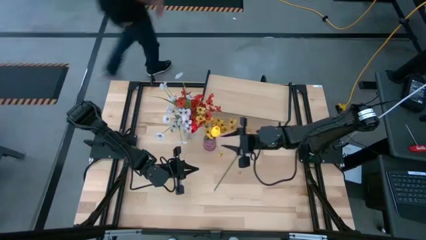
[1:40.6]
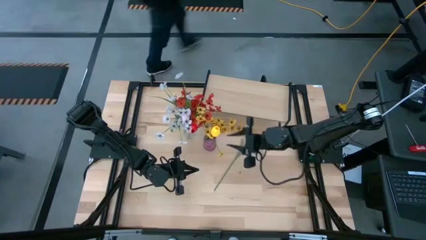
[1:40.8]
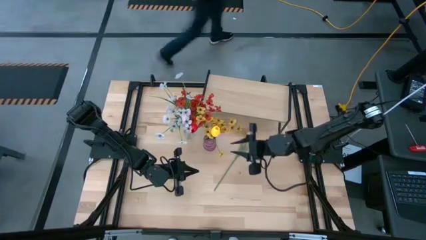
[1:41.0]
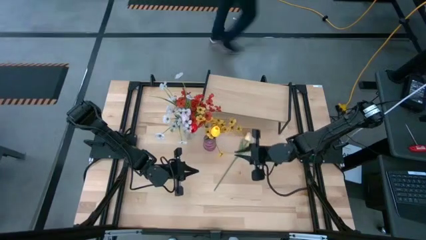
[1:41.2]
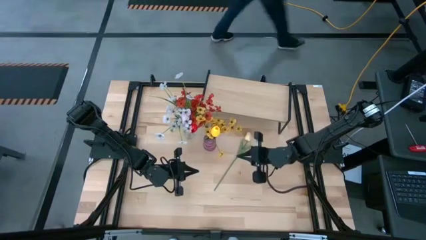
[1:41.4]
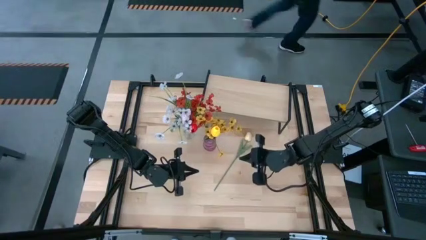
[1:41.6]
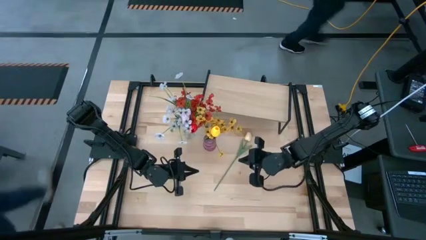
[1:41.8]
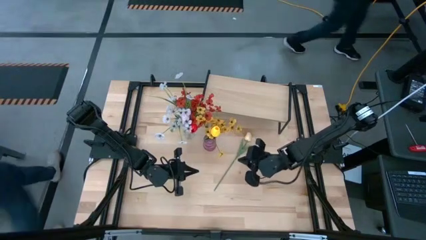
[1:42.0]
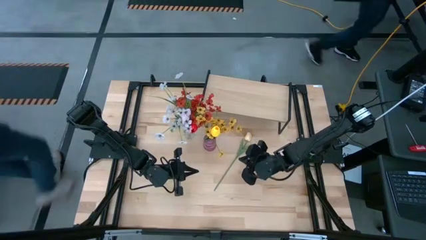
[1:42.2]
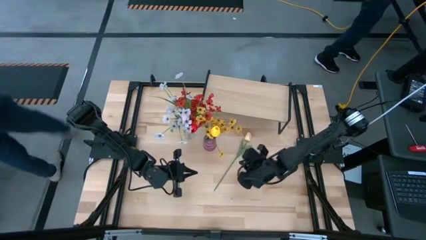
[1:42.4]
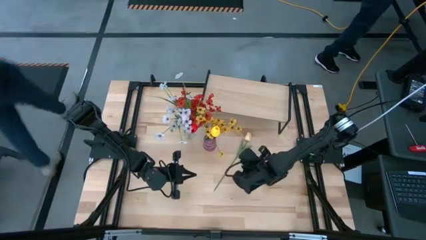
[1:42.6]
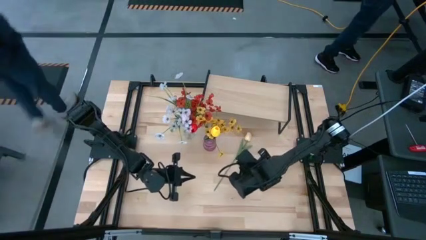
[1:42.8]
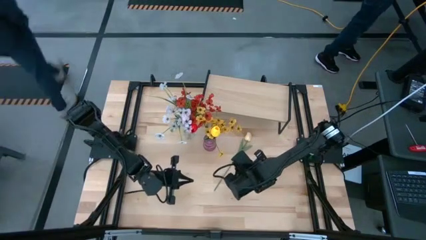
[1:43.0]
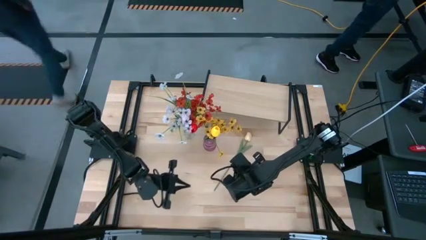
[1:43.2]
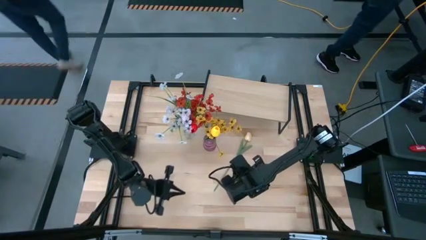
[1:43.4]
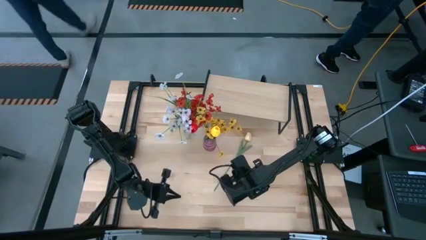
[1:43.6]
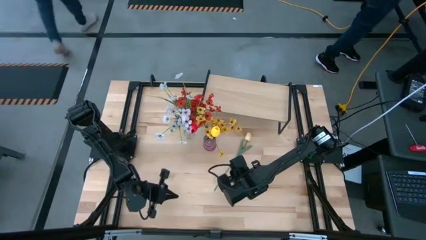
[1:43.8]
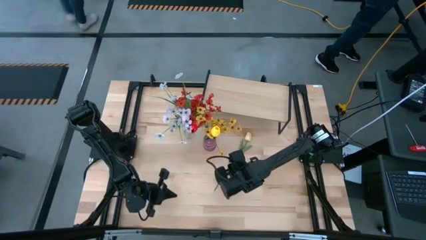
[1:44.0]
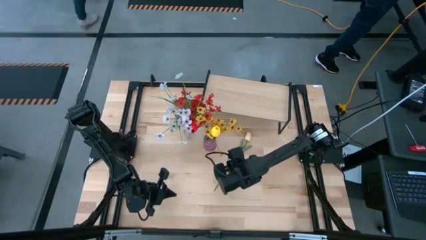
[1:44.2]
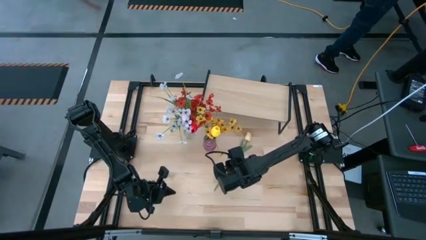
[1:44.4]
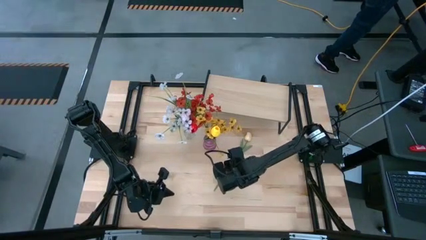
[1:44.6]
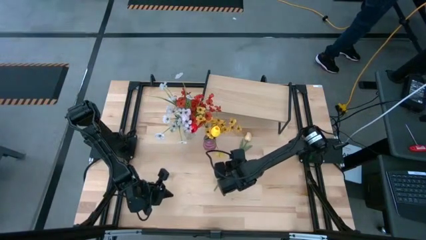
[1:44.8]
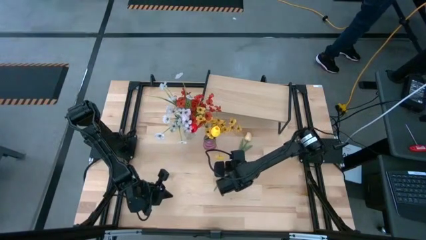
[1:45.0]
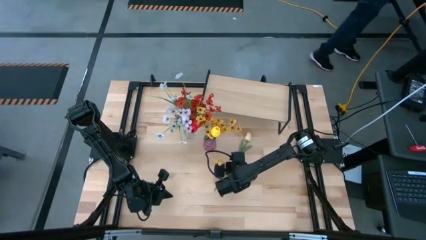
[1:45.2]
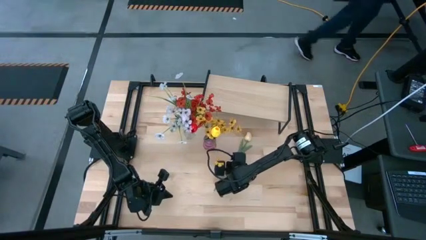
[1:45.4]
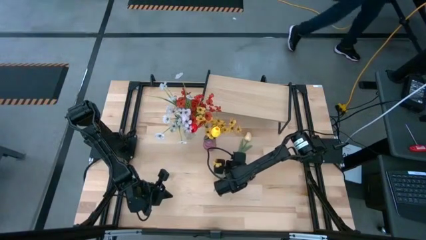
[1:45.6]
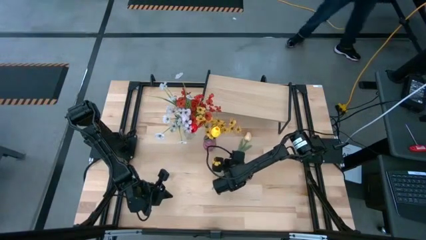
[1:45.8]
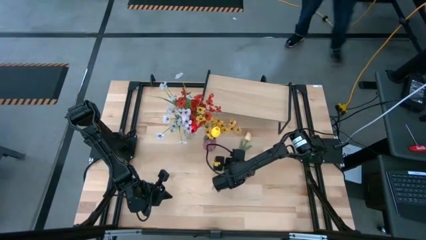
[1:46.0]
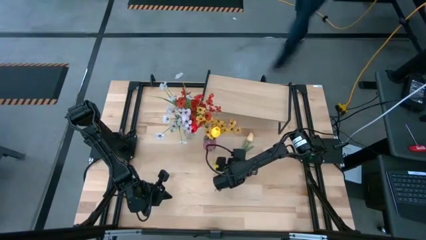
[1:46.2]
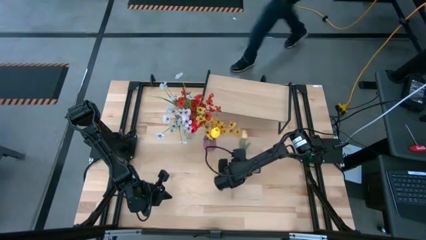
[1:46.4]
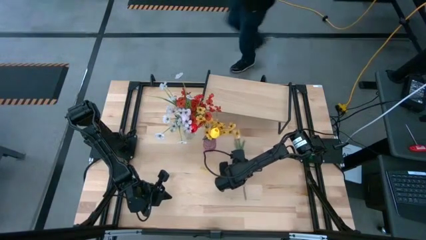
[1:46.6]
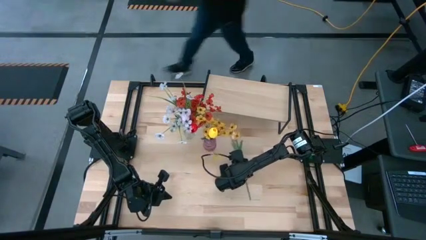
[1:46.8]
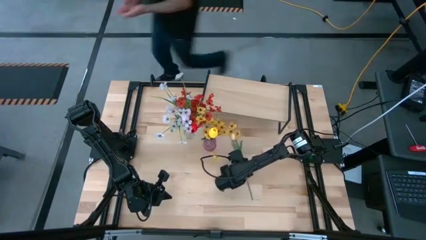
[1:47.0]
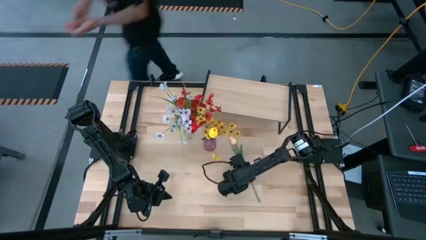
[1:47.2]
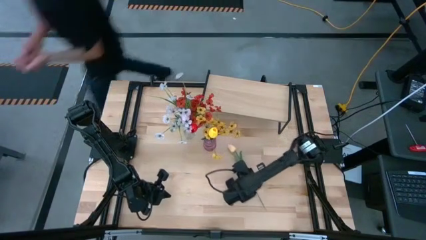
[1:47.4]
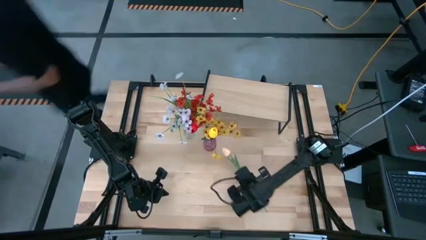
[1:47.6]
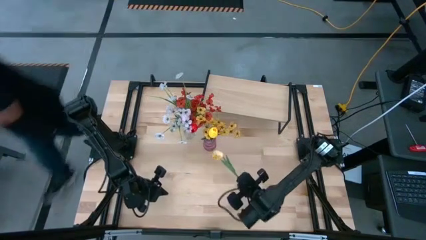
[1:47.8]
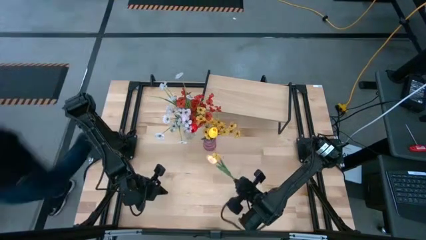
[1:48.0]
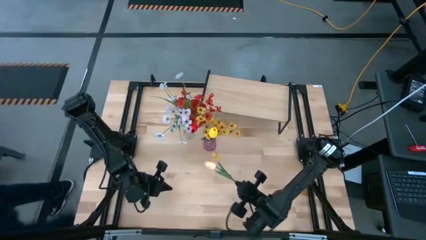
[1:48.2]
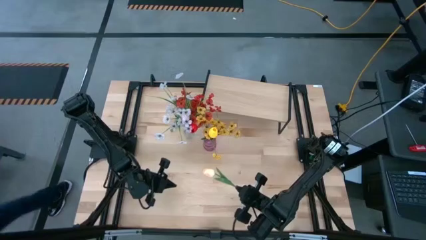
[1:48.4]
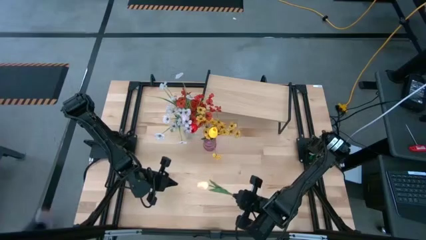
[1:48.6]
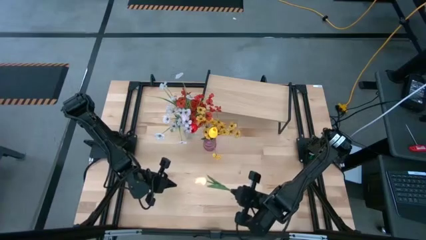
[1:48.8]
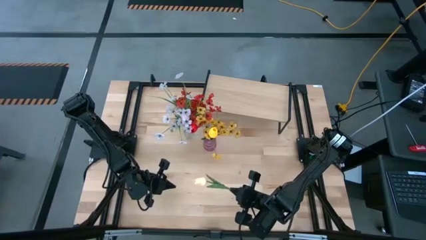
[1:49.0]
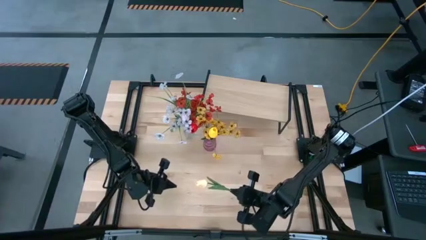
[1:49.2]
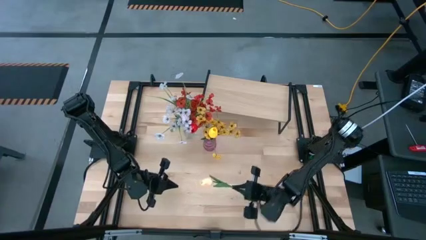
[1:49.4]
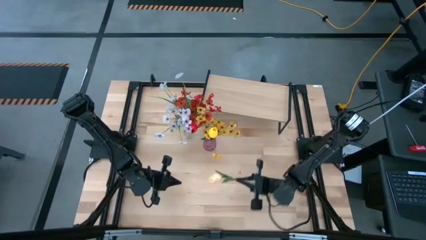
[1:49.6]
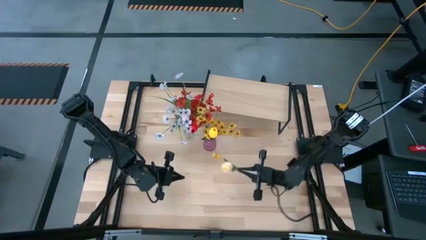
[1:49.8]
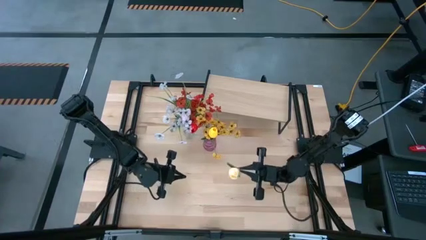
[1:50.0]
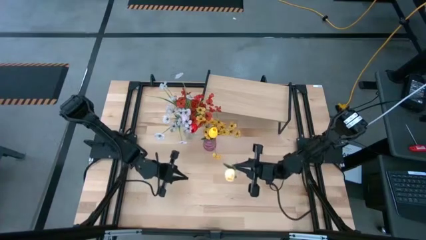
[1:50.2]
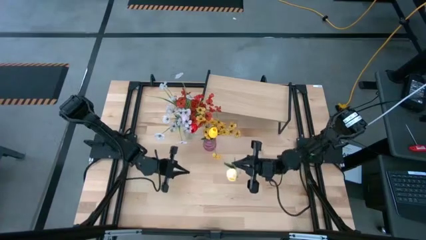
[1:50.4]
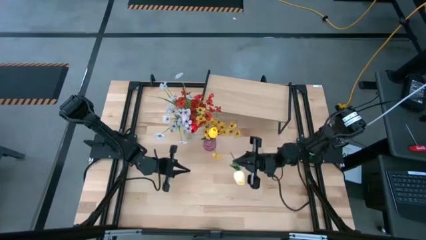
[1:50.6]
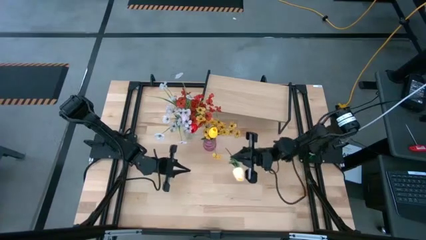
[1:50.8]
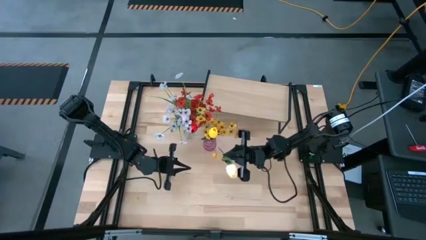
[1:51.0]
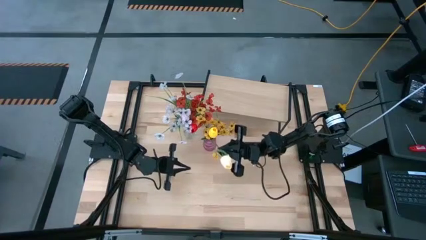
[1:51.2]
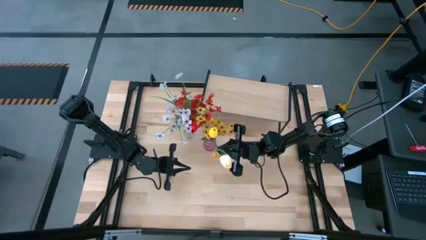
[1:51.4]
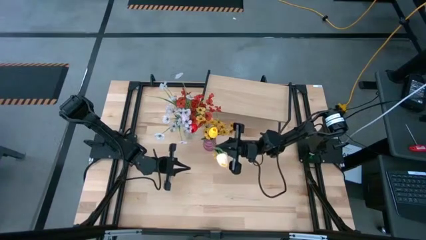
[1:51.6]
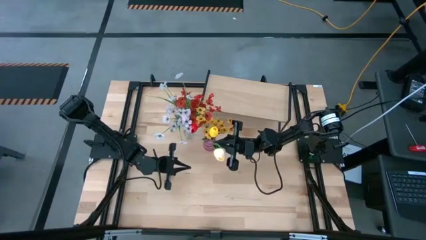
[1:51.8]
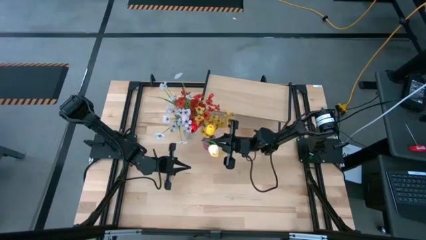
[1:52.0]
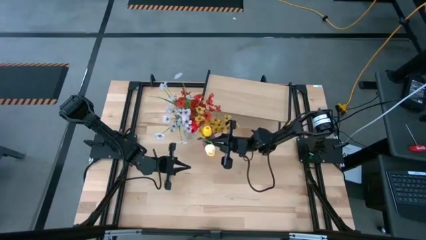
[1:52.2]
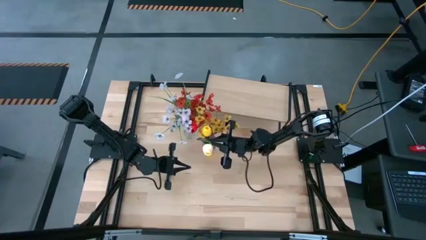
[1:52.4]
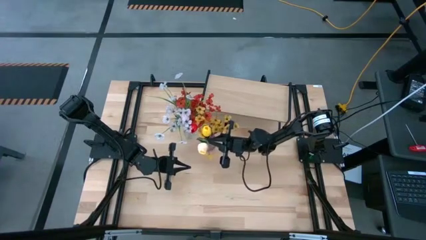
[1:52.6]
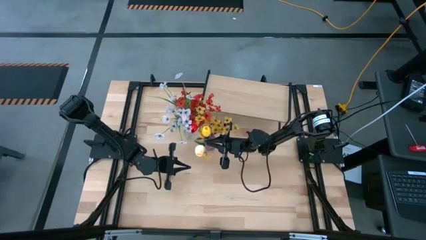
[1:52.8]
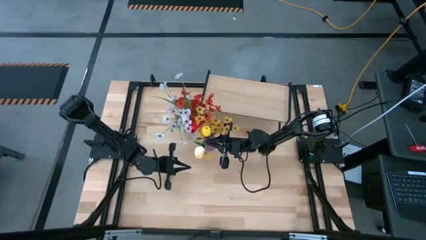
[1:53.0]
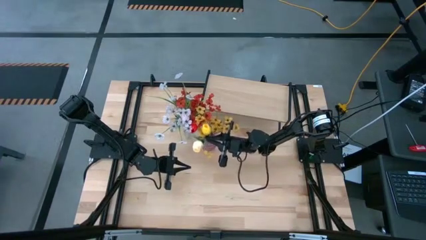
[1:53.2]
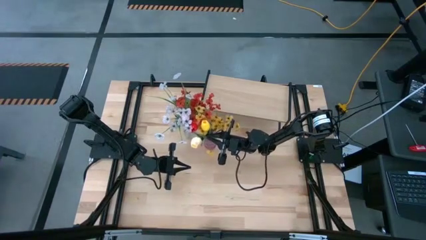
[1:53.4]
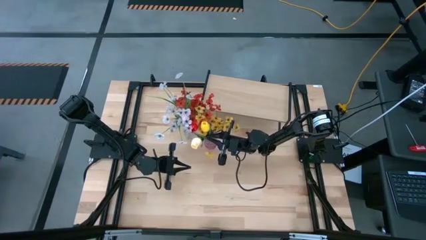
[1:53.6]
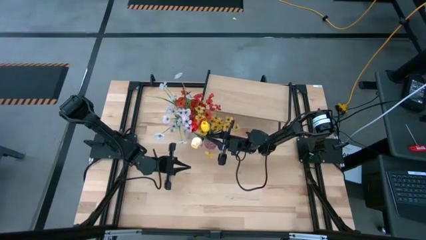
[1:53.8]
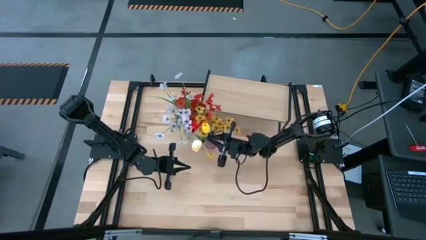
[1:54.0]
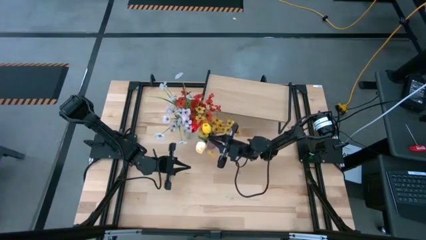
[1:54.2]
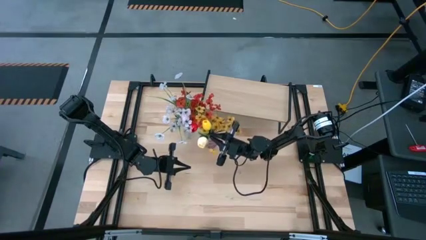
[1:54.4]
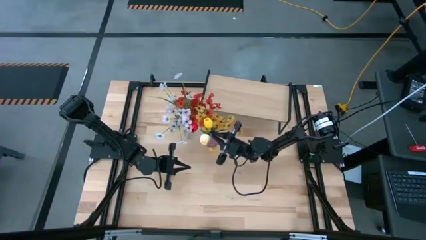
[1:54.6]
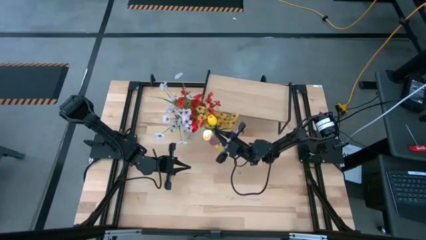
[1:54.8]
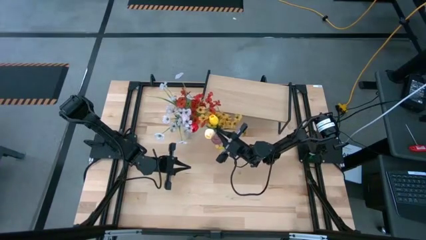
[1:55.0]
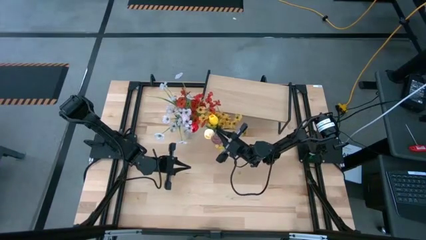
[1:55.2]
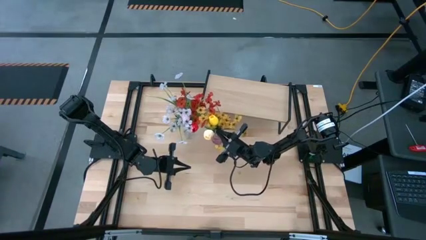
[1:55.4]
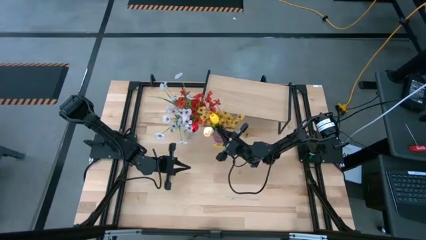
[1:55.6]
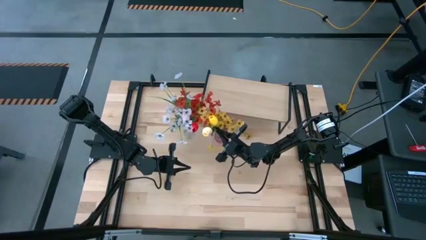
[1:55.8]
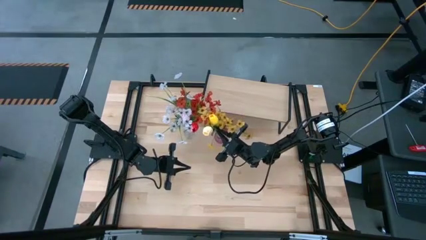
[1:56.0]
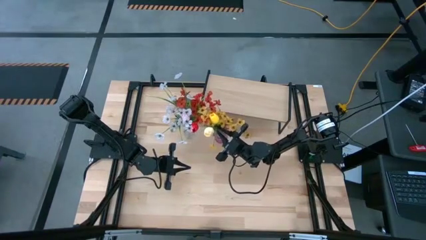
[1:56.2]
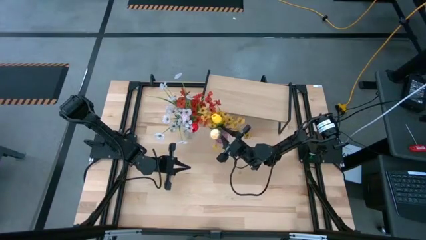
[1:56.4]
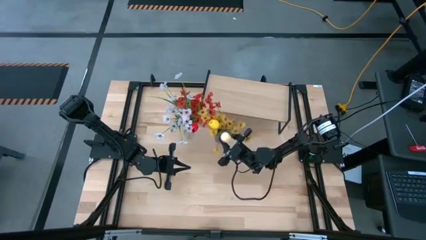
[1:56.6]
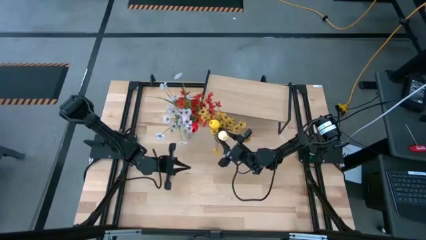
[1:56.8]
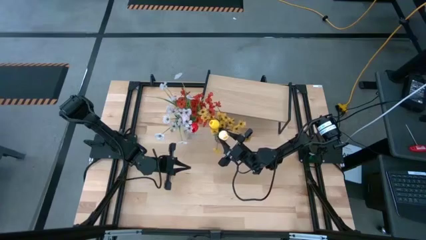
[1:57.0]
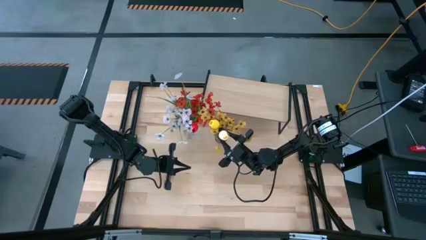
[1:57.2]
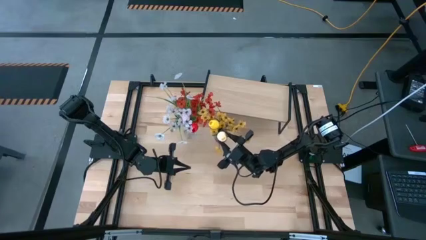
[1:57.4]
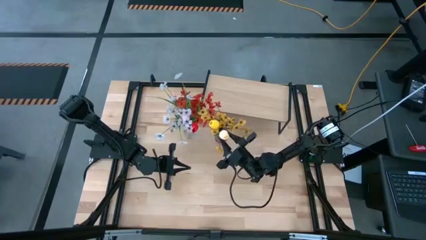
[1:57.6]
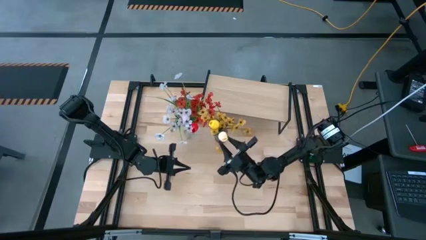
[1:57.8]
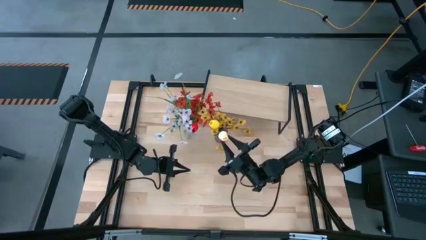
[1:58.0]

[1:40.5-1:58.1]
Task: Pick and place flowers into a vace then onto a shelf
Put the light yellow flower into the violet vase
